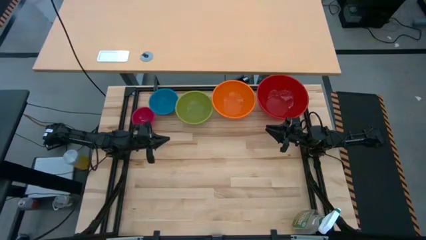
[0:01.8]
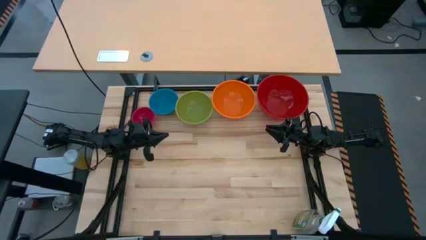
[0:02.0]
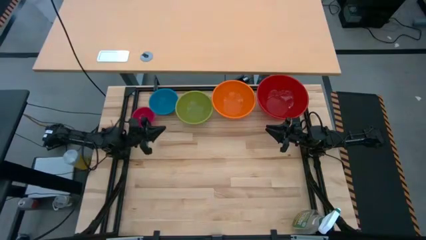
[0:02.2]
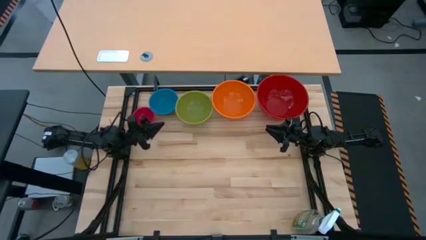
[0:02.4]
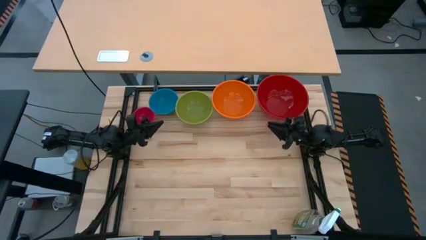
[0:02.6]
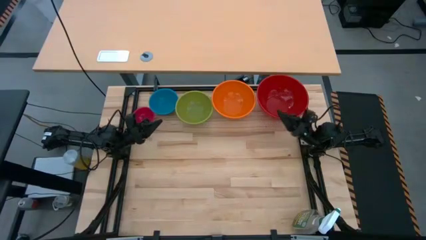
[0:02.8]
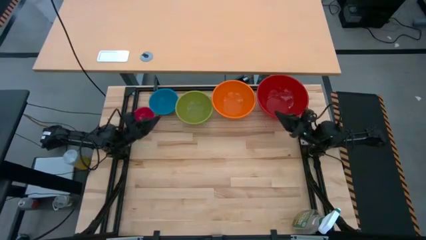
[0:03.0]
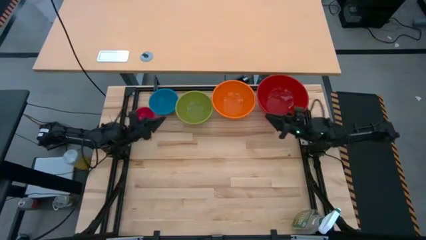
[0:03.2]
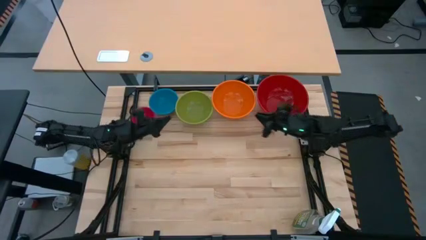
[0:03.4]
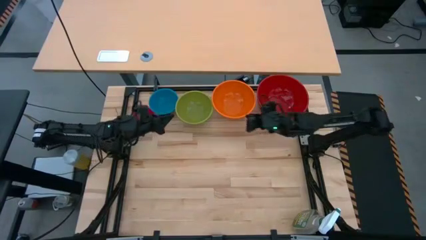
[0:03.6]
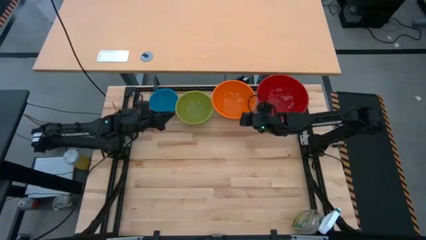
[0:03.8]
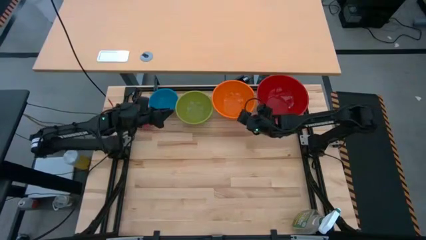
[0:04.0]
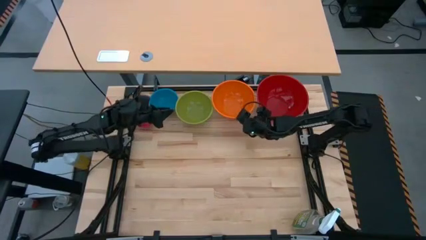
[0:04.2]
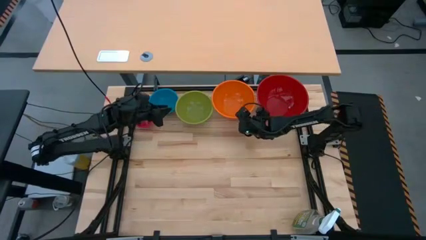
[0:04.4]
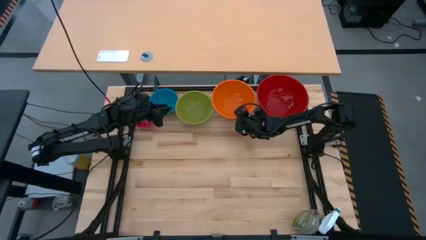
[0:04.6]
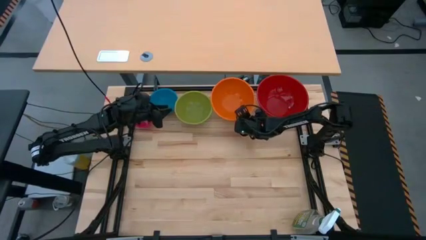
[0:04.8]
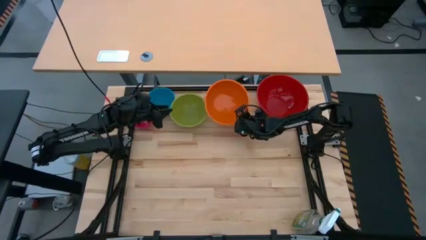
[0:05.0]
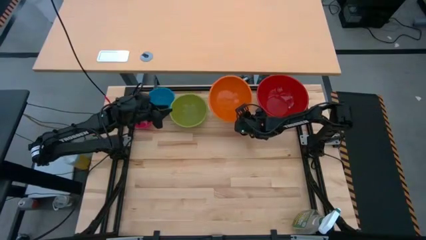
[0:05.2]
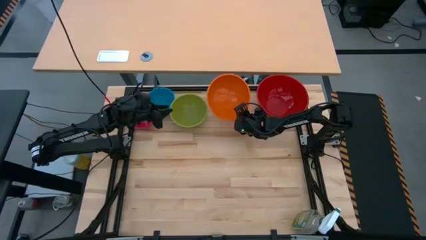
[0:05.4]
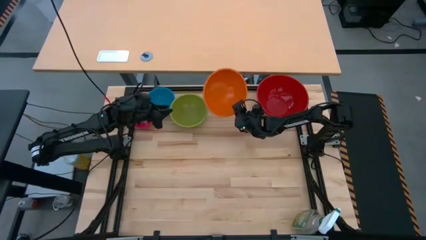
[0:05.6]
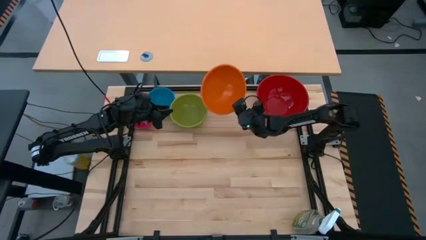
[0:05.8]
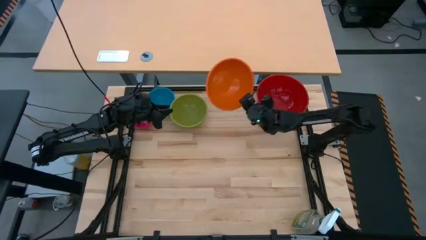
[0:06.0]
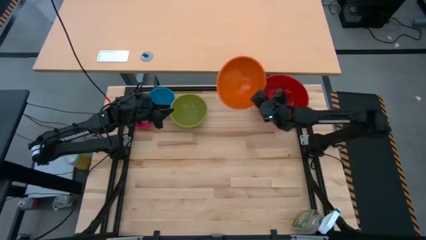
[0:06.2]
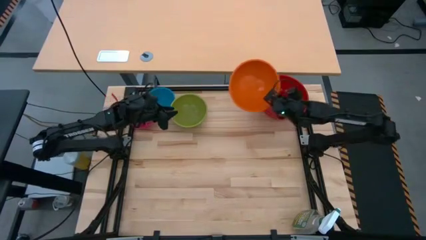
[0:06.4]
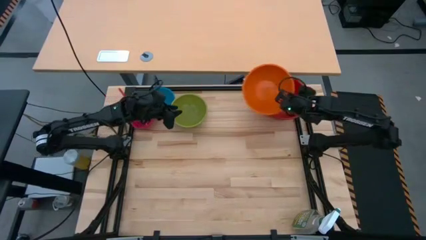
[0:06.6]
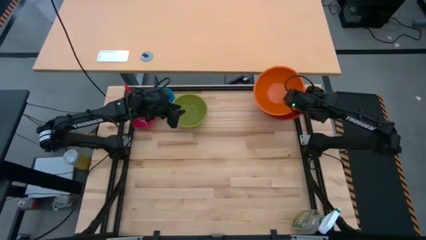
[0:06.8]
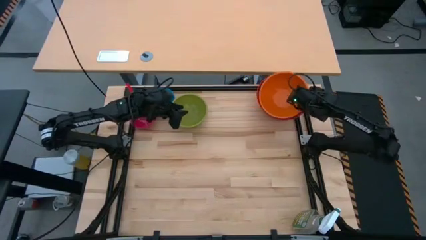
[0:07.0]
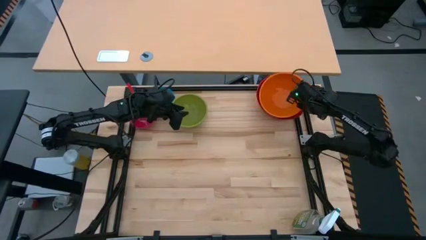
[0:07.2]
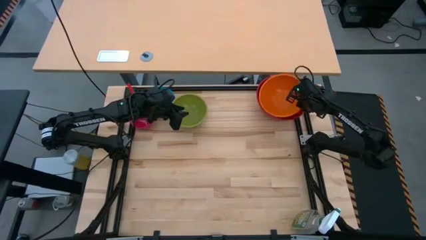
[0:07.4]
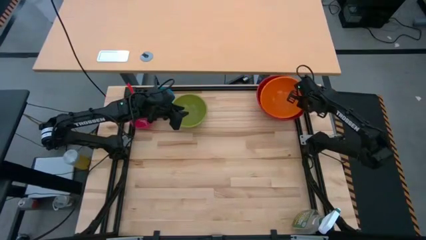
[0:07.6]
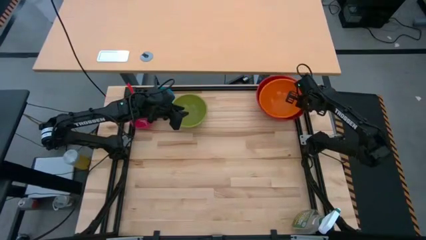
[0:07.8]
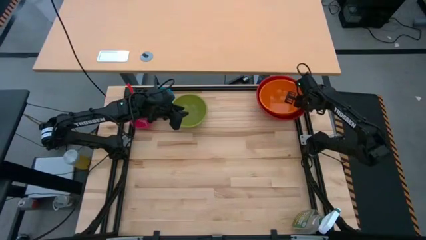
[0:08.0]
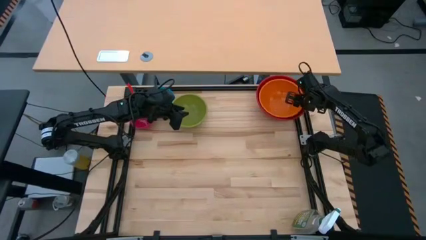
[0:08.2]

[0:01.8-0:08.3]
Stack the orange bowl on top of the red bowl

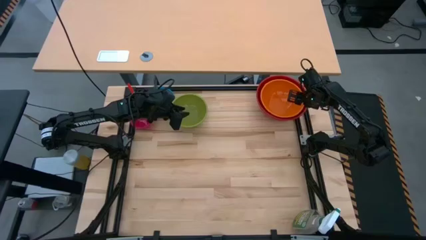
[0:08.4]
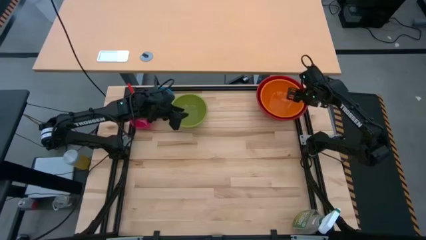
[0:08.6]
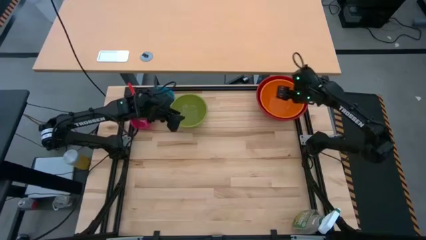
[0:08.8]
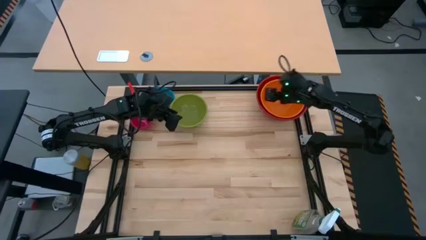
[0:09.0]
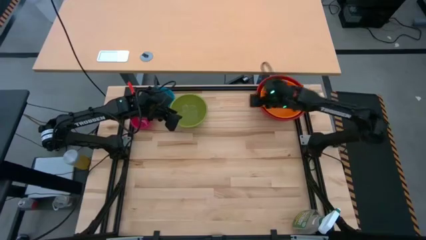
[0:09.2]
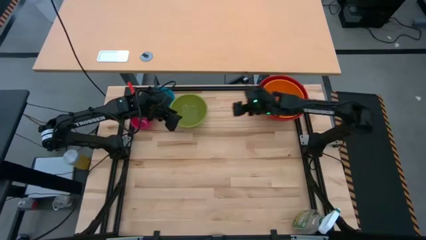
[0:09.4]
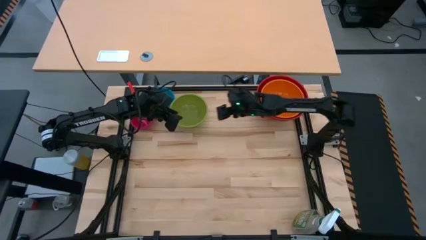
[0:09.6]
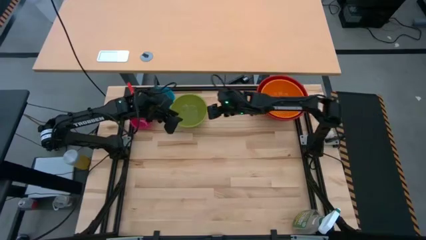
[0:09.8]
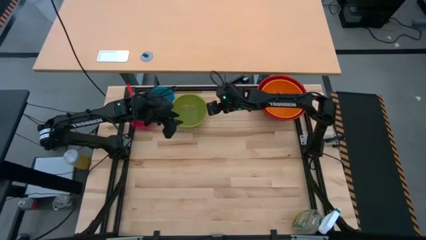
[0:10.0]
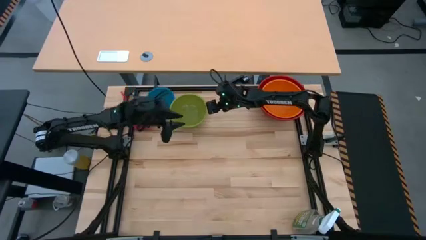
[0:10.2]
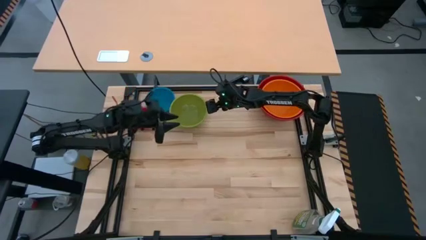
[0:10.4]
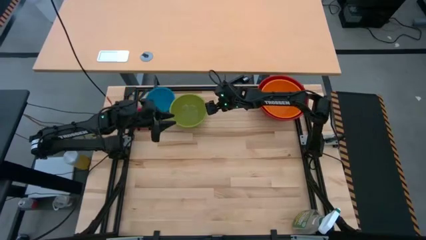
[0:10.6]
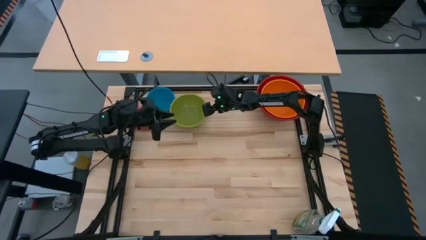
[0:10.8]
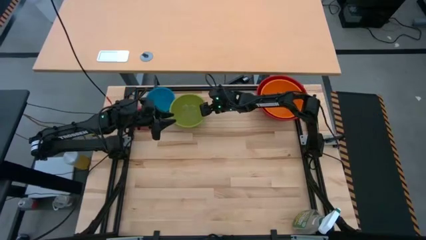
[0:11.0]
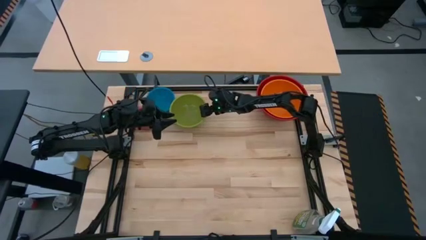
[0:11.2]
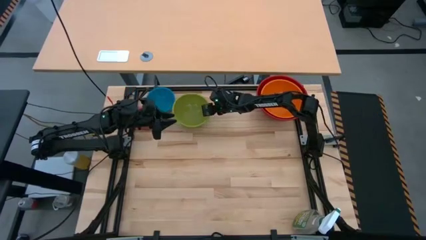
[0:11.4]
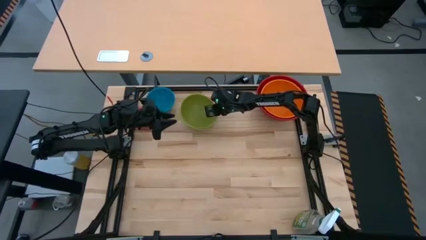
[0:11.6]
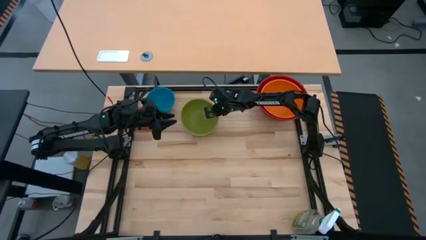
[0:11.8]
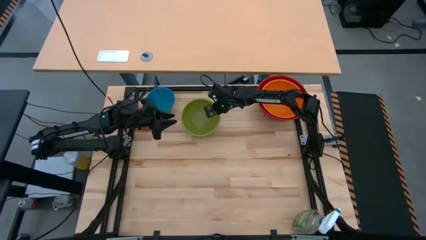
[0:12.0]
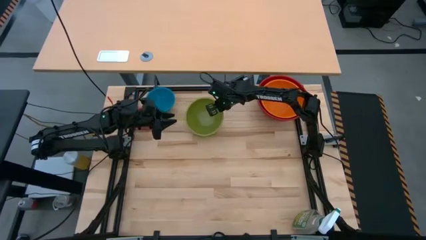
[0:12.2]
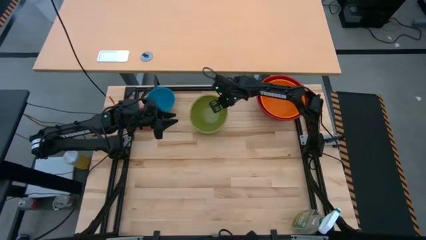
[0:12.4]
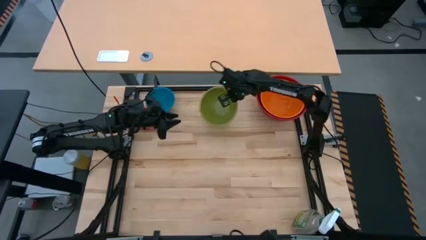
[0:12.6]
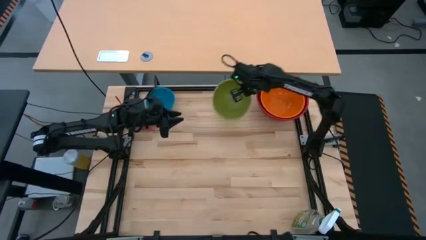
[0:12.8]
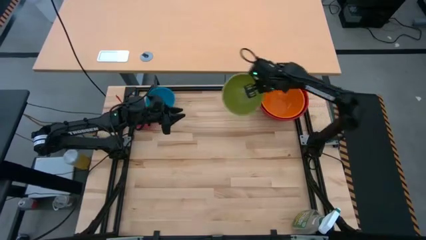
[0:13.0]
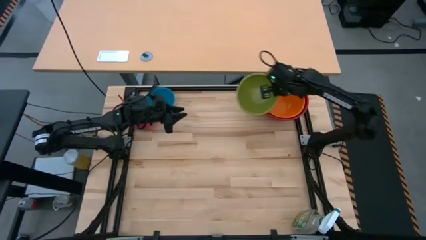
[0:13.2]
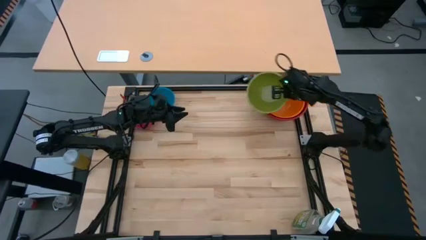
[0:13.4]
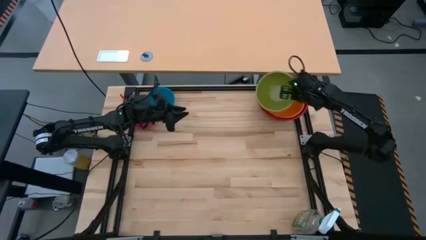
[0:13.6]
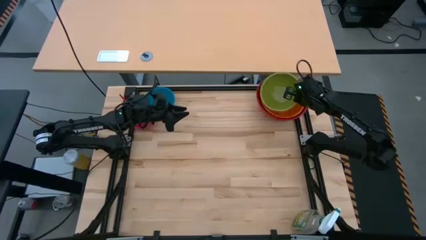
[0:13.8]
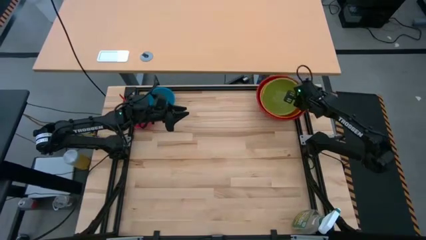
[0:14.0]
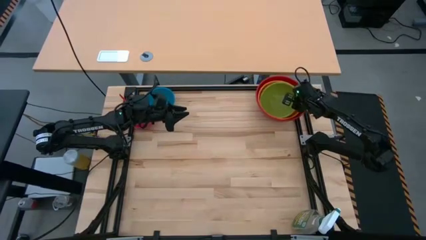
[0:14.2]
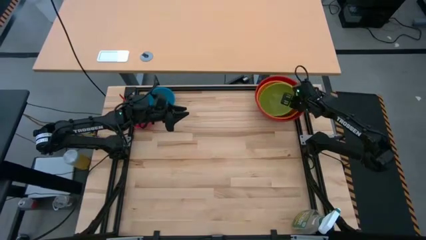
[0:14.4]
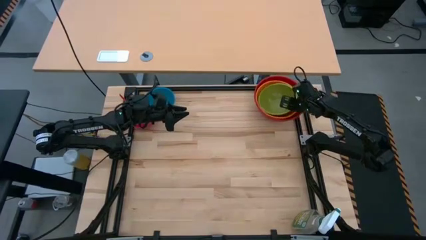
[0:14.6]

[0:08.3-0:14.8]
Stack the green bowl on top of the orange bowl
